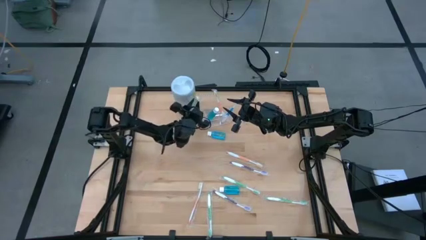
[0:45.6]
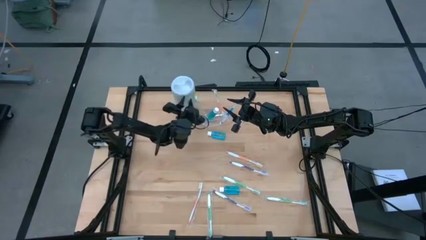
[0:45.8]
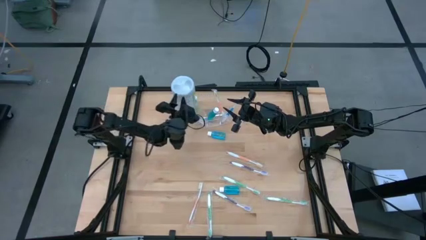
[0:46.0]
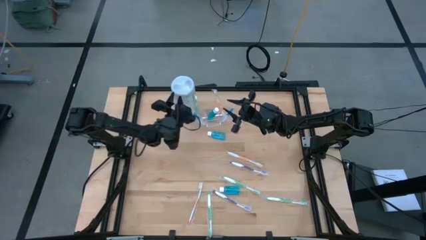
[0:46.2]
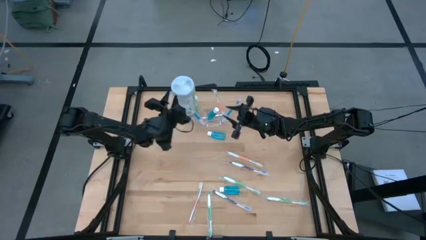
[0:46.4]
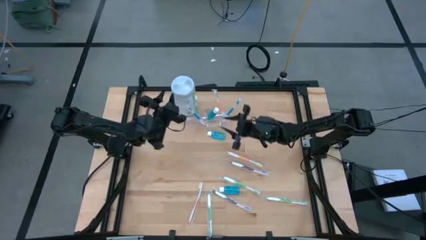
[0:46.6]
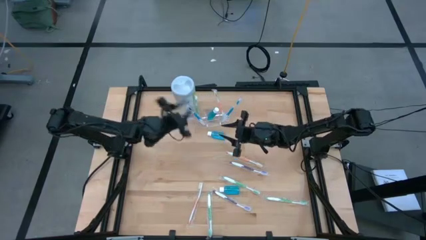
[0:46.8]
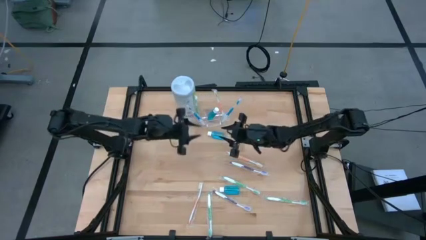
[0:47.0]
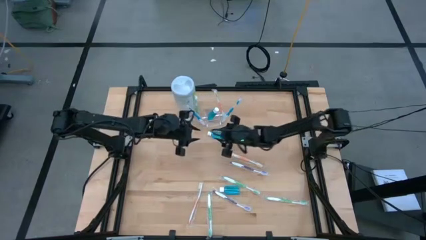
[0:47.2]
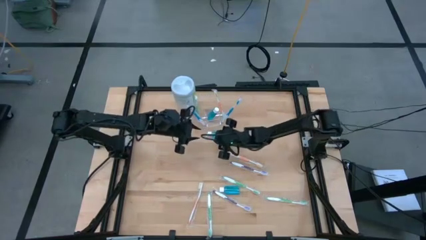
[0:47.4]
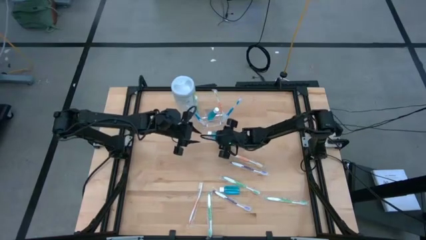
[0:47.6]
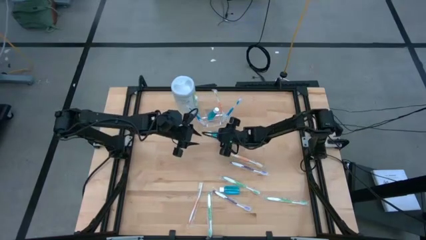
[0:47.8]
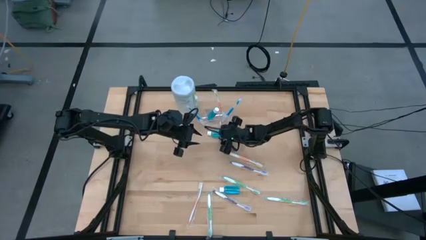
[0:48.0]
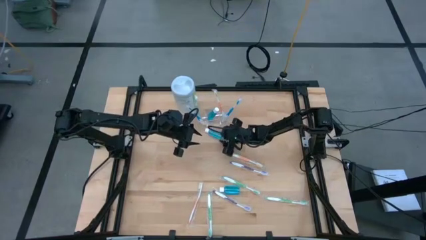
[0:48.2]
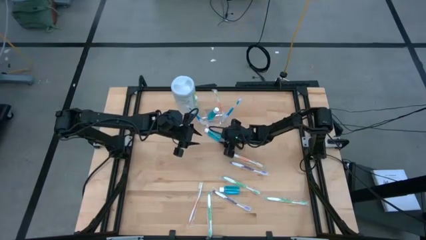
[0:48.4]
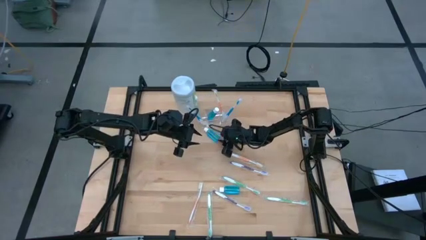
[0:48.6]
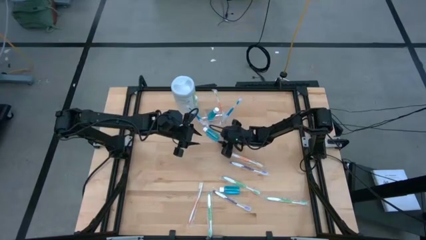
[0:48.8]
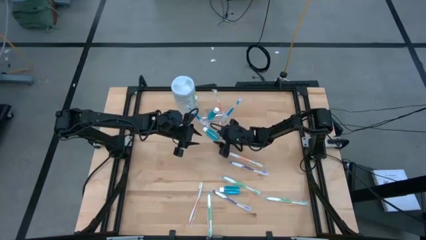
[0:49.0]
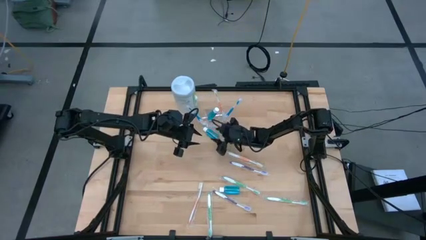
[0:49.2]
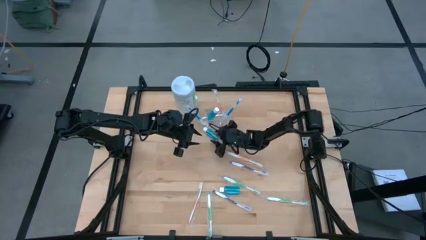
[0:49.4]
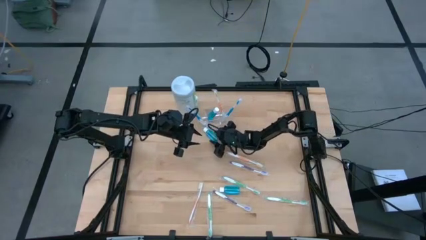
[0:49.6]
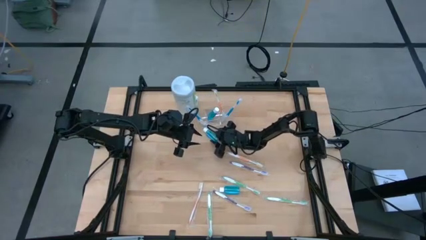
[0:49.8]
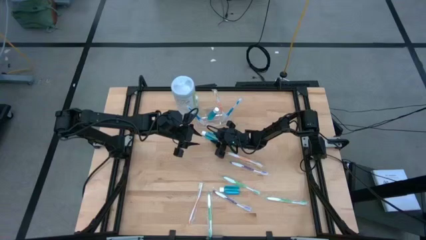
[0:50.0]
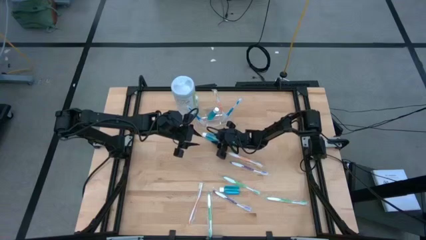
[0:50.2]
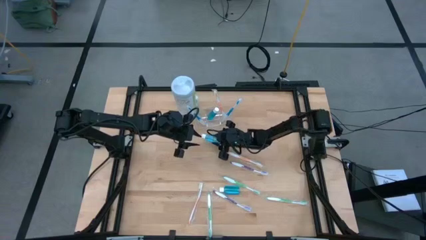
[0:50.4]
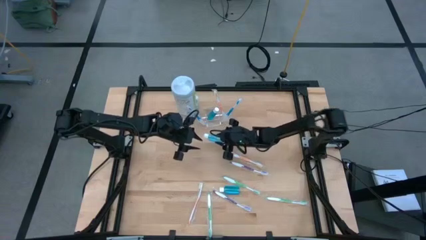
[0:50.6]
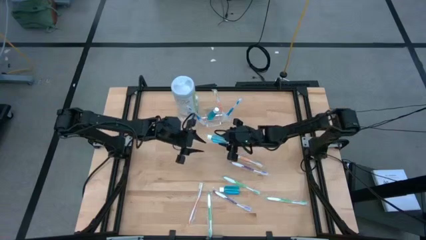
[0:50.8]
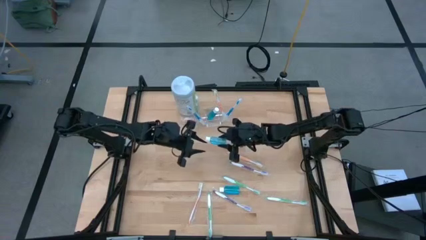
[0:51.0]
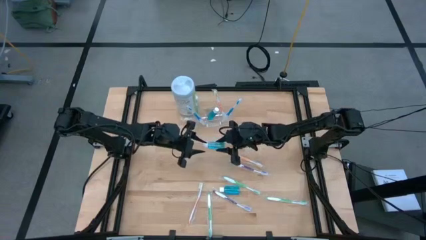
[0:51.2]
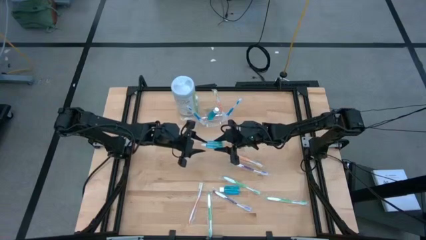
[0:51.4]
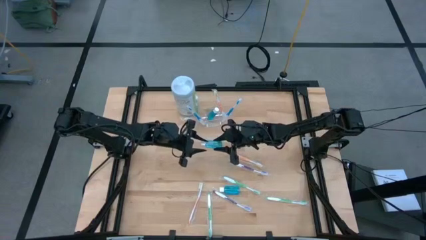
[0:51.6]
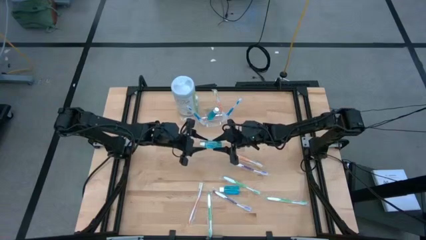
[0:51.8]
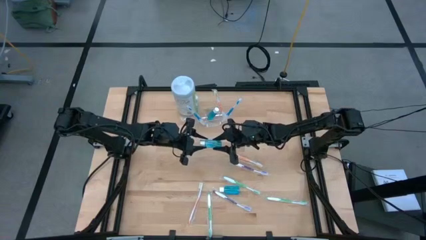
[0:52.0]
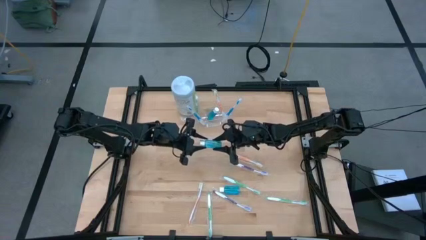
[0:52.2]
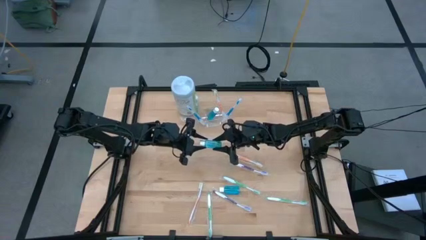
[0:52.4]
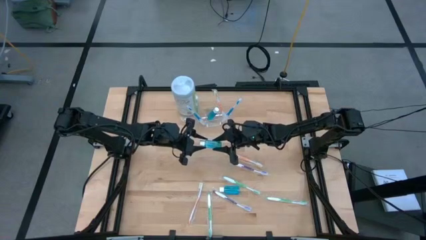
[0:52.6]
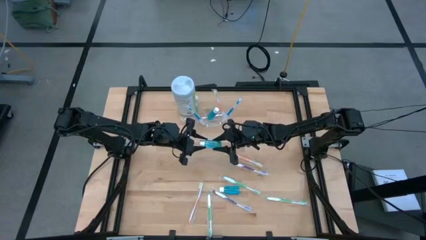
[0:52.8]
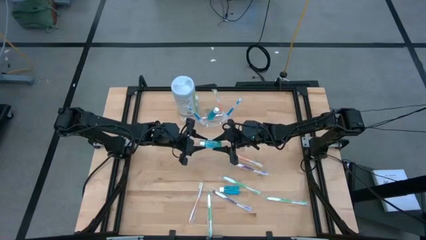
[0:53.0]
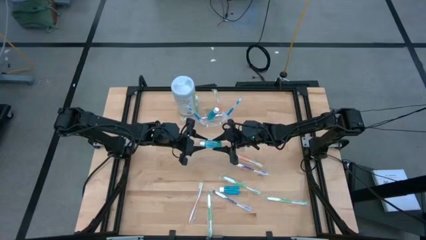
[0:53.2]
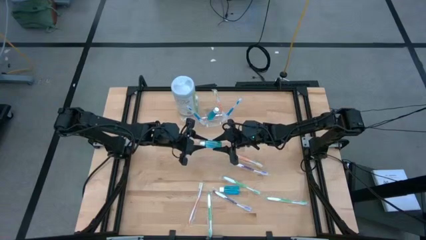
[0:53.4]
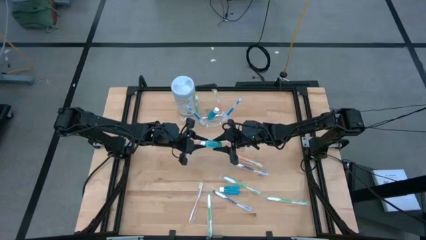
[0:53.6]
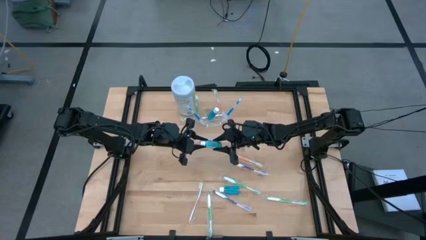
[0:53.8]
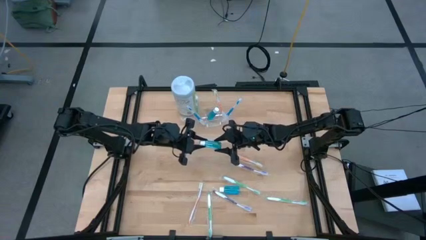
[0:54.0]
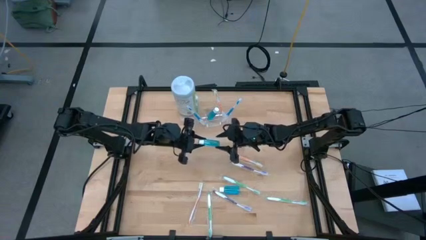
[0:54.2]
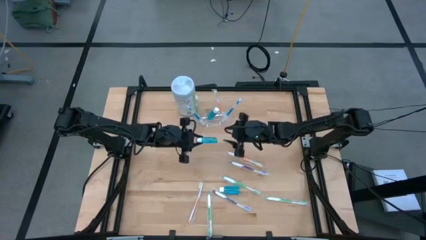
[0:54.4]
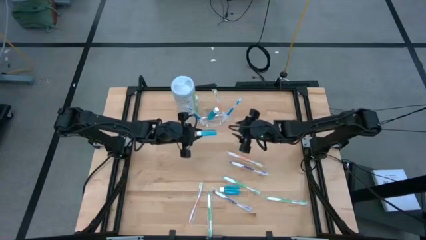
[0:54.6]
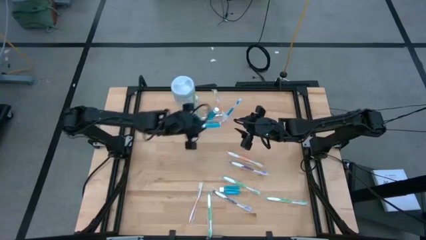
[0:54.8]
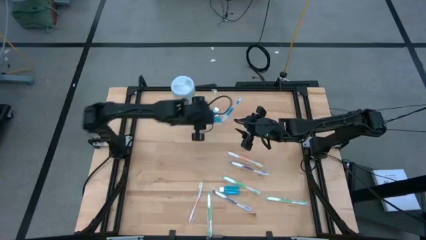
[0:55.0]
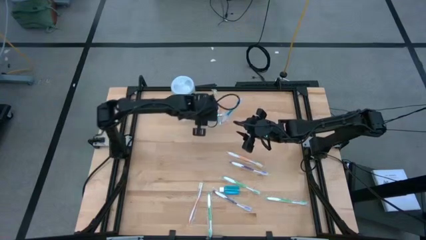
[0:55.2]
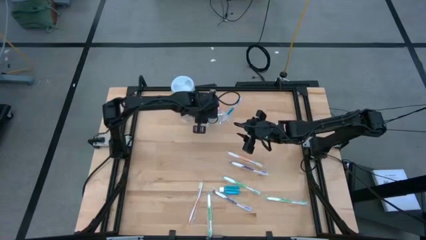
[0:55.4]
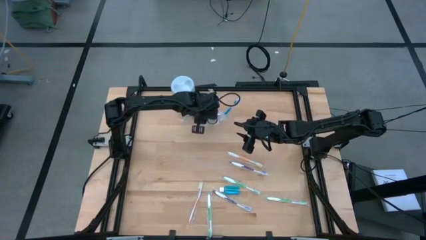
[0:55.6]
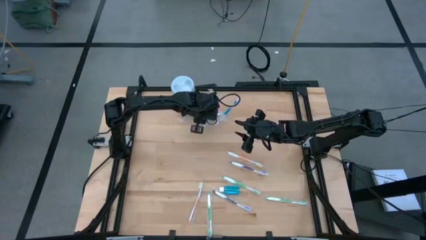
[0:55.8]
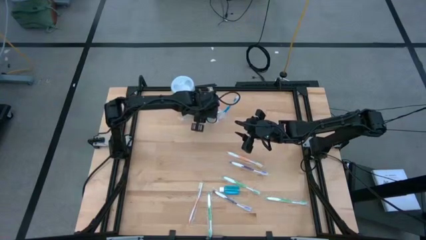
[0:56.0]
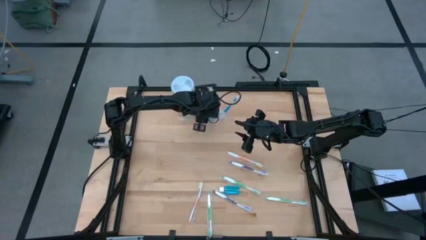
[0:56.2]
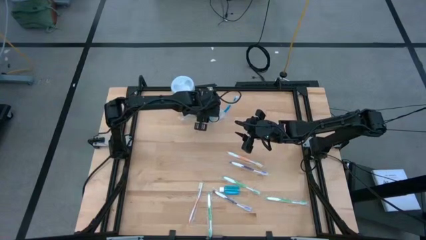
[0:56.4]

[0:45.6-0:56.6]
Task: Pick & Place toothbrushing station
Put the mouthwash into the transparent organizer
